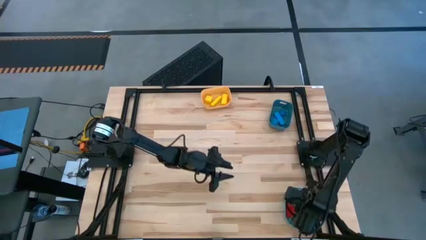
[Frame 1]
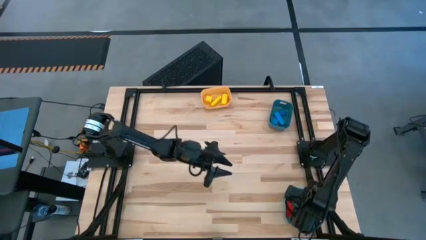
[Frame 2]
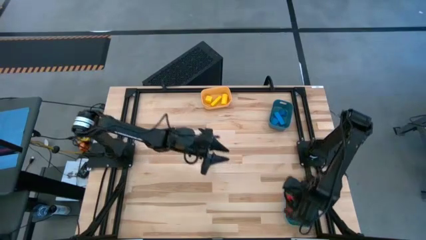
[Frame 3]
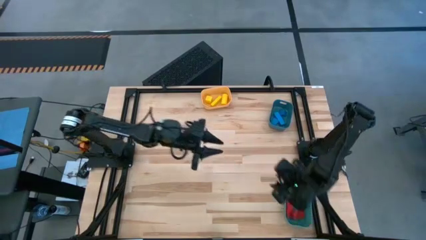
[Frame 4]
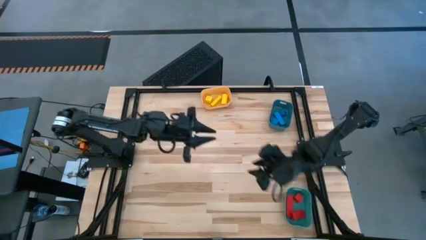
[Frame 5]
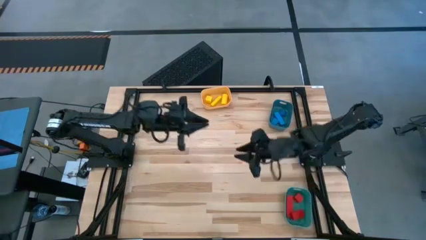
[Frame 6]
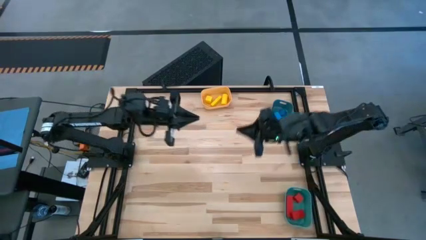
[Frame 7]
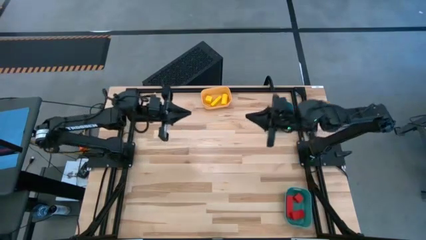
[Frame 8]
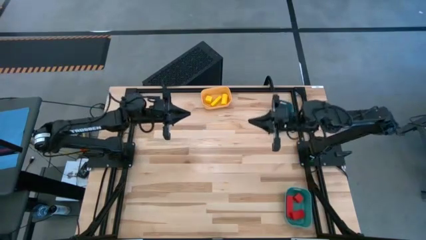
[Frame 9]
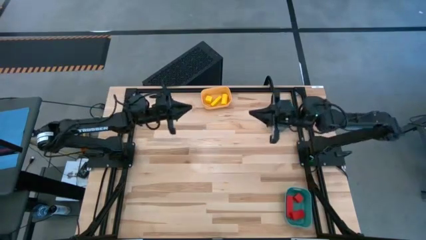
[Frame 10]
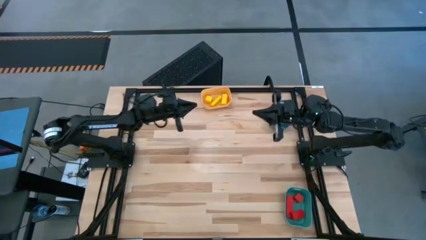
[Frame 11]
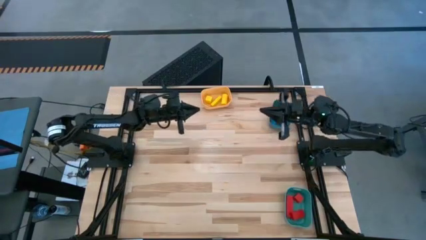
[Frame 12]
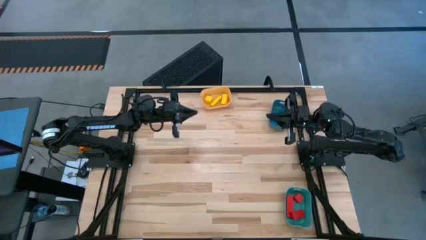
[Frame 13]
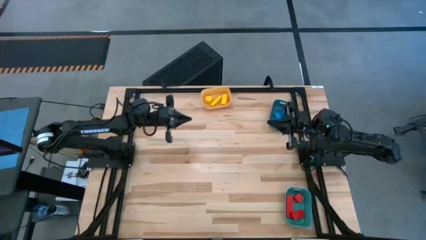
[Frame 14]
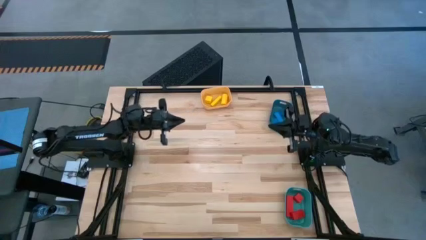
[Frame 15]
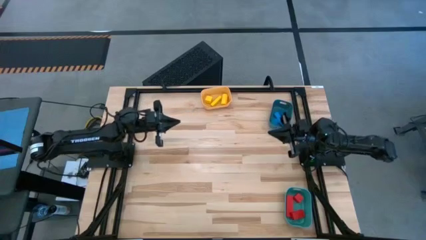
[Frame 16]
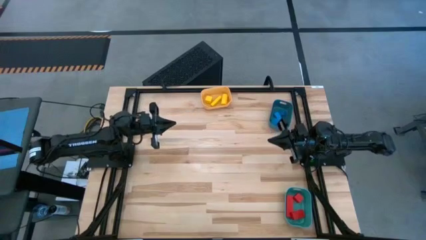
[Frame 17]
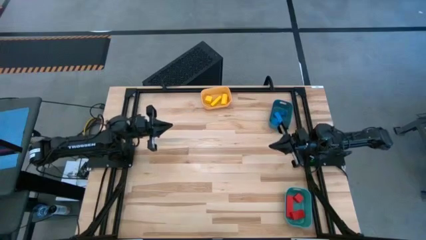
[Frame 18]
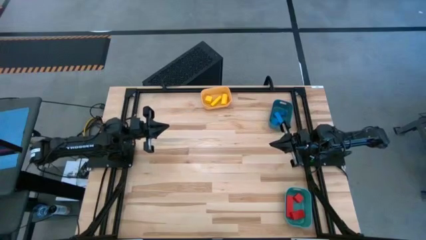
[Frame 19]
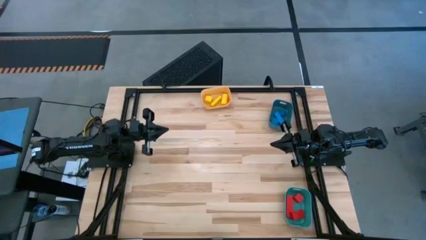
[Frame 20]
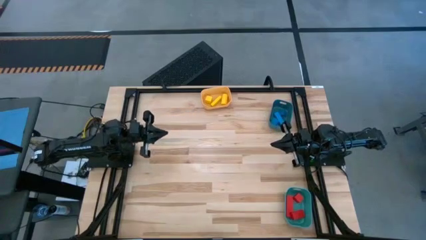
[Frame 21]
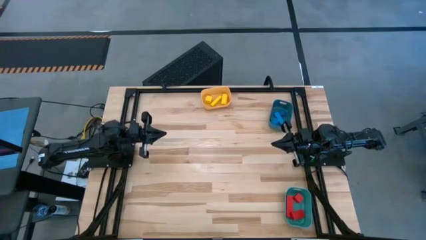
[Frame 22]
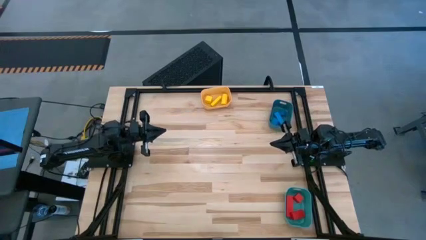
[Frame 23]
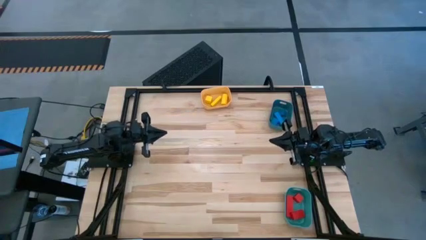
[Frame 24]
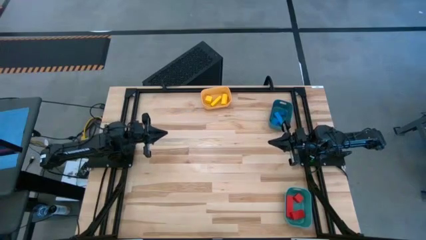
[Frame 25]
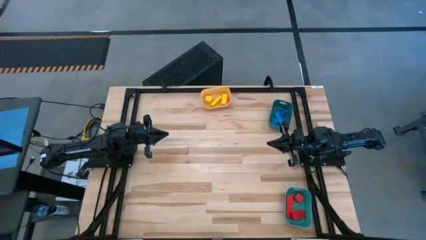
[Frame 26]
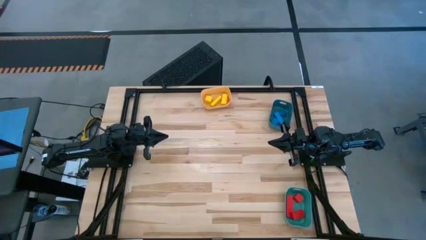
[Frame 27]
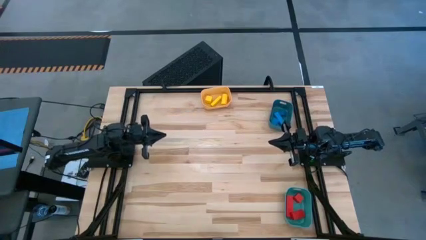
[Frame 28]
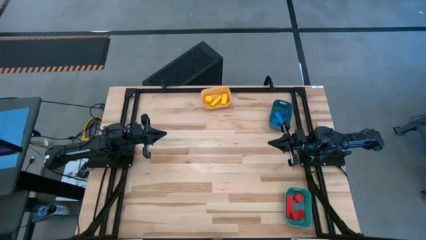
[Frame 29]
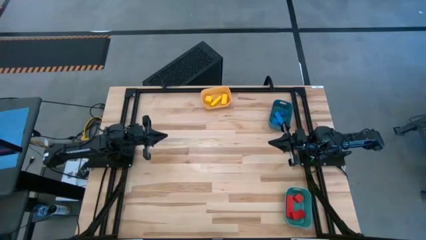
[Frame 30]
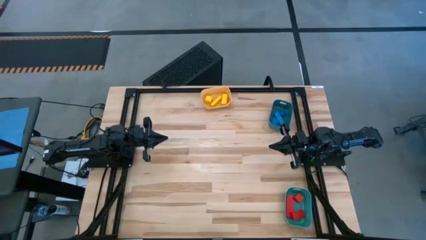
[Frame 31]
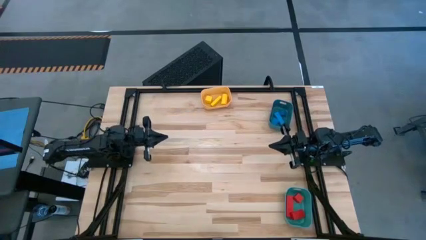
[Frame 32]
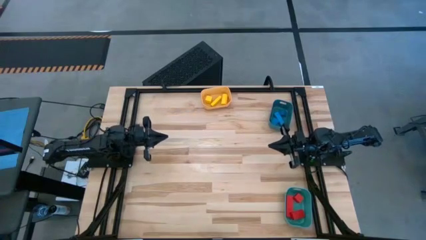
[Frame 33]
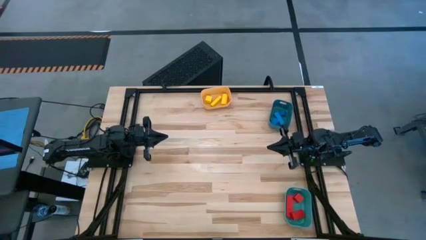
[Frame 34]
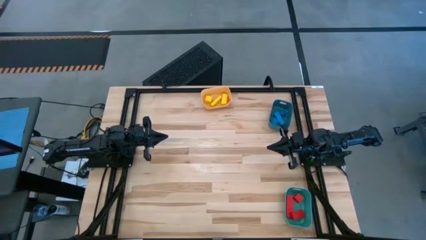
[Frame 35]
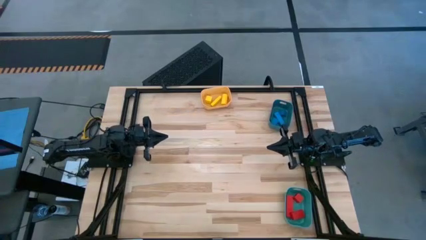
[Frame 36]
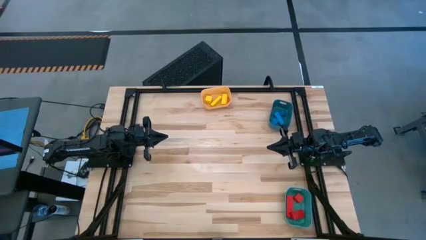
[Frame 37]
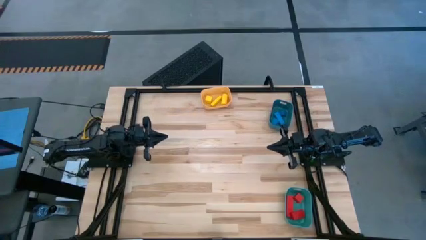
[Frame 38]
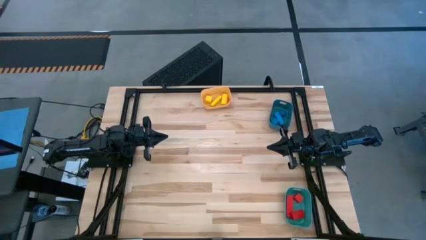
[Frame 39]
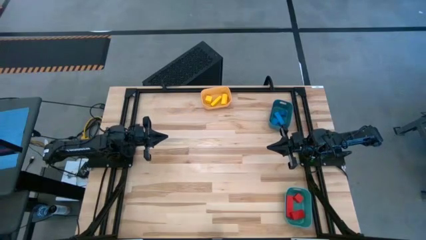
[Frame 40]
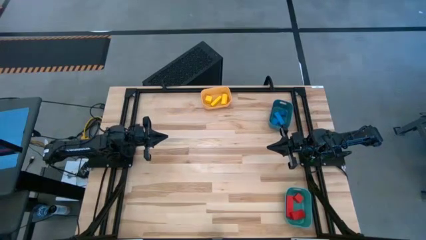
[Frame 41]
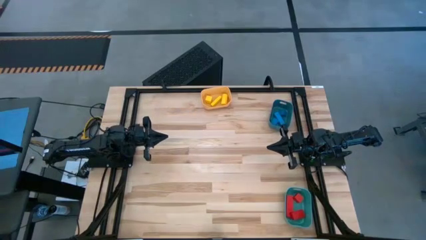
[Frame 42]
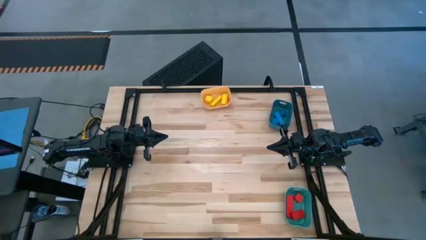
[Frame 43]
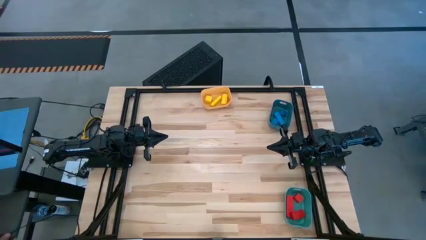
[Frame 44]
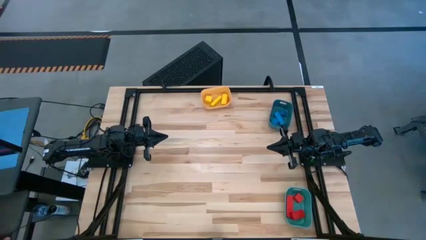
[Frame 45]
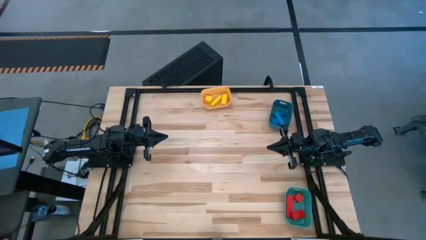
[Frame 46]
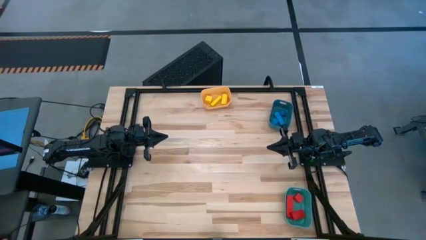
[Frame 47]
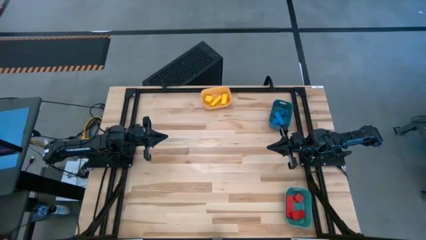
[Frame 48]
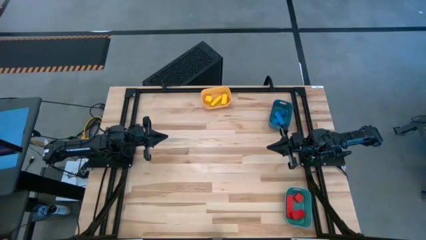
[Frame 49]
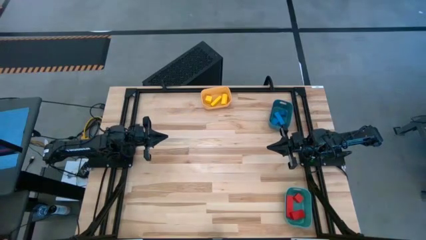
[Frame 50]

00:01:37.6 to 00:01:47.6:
Task: Sort & place blocks by color
Return to Home Position

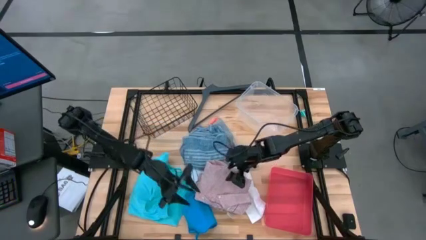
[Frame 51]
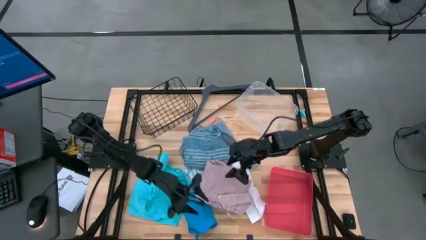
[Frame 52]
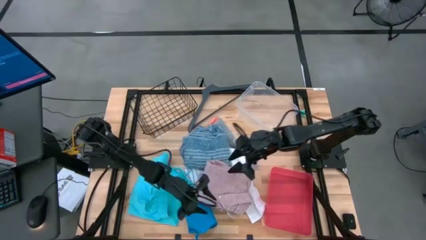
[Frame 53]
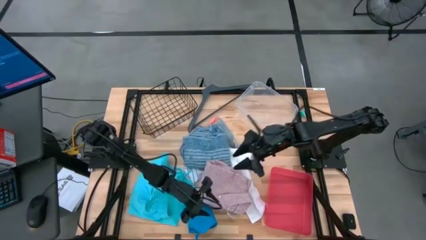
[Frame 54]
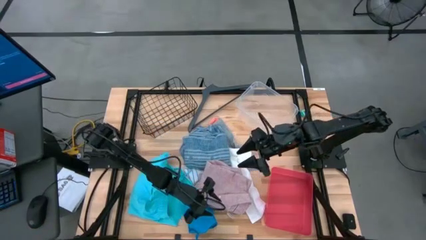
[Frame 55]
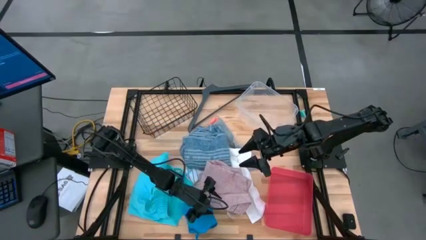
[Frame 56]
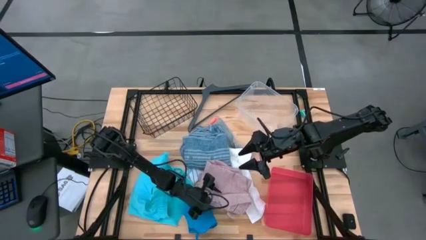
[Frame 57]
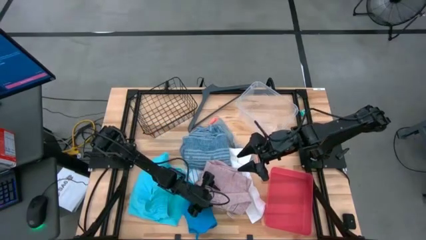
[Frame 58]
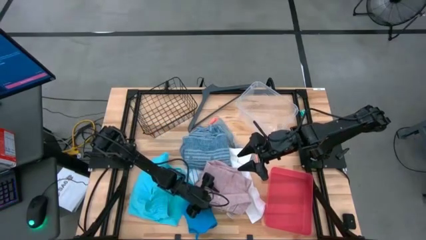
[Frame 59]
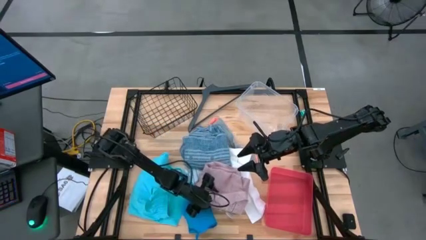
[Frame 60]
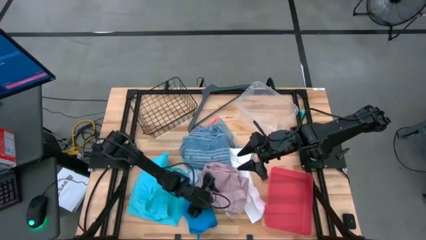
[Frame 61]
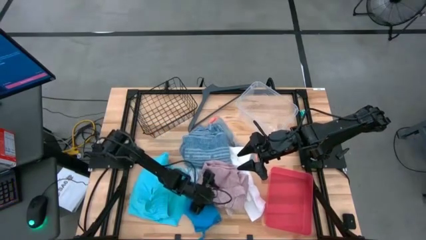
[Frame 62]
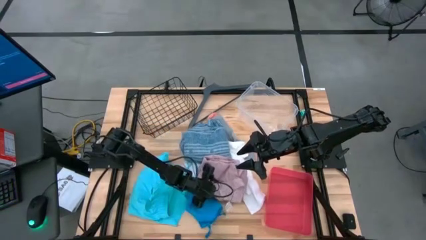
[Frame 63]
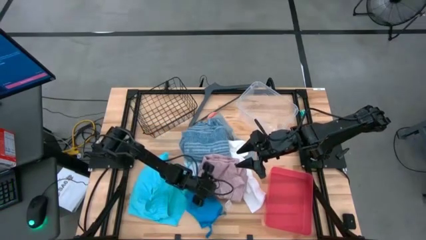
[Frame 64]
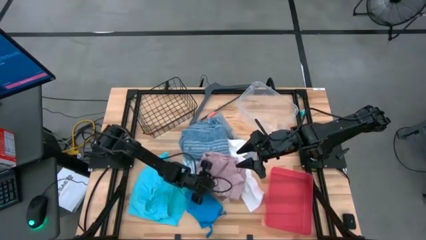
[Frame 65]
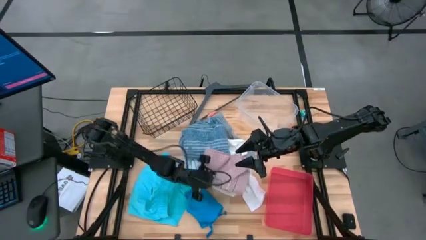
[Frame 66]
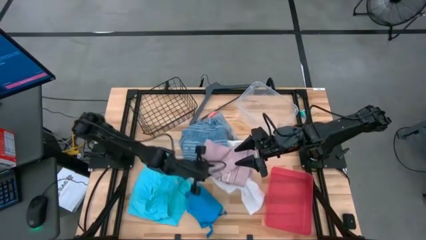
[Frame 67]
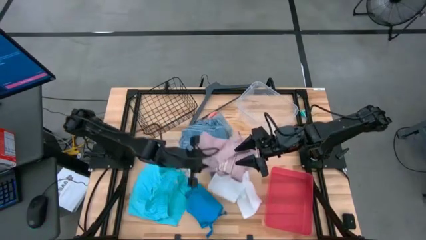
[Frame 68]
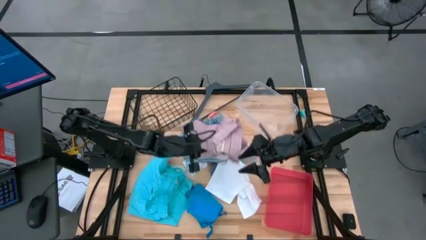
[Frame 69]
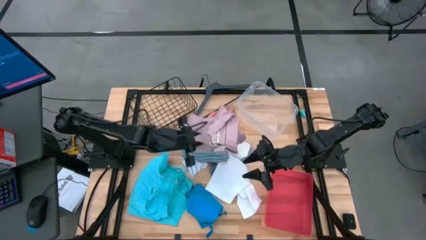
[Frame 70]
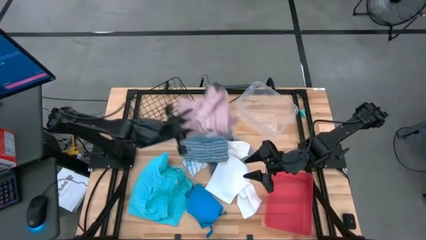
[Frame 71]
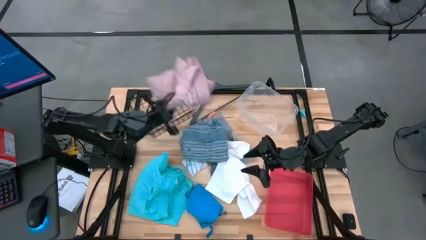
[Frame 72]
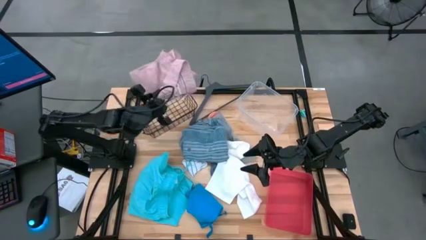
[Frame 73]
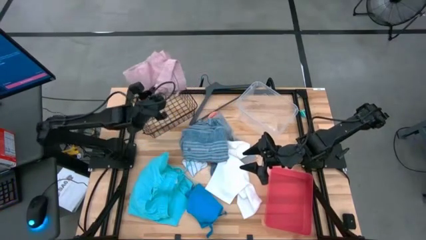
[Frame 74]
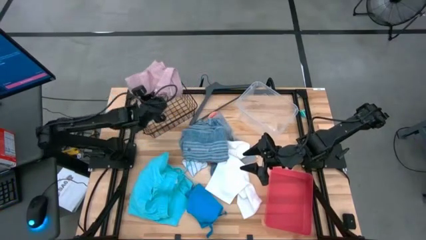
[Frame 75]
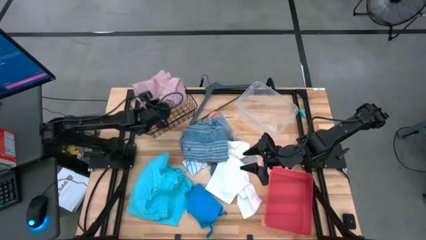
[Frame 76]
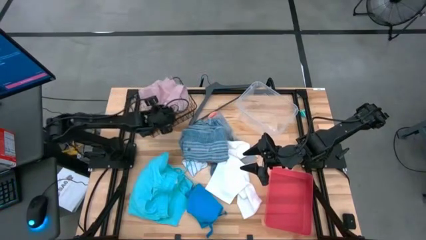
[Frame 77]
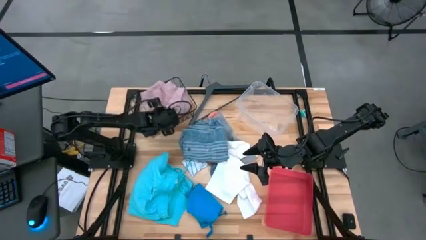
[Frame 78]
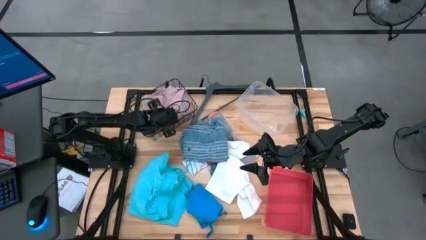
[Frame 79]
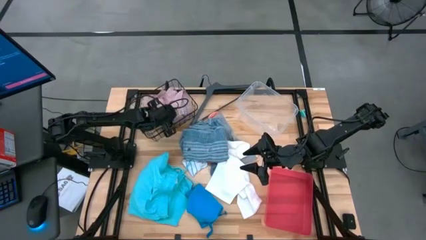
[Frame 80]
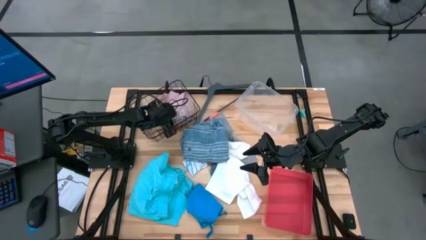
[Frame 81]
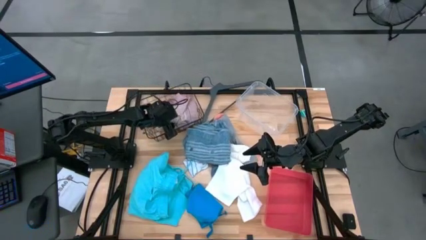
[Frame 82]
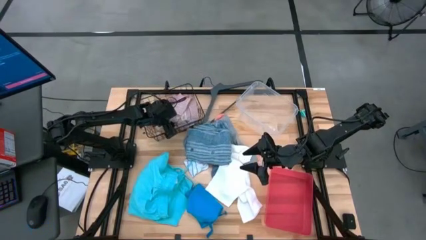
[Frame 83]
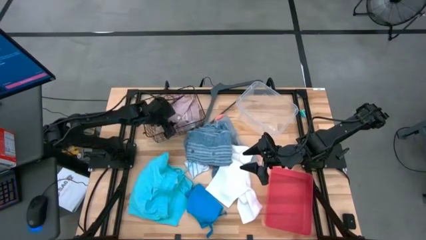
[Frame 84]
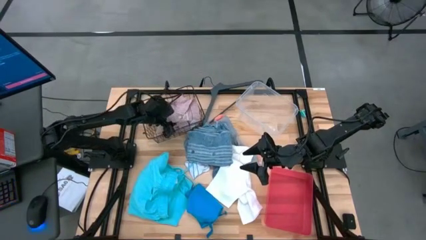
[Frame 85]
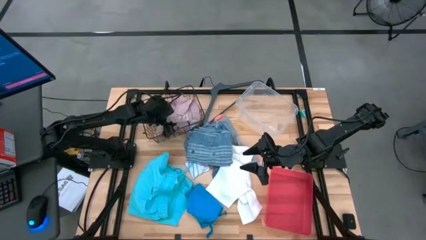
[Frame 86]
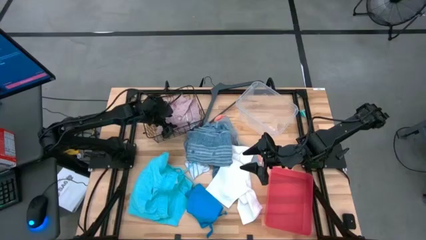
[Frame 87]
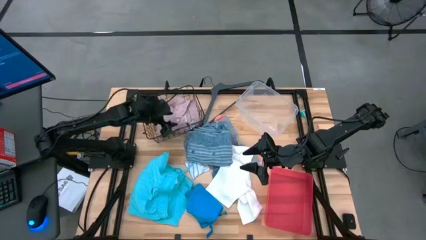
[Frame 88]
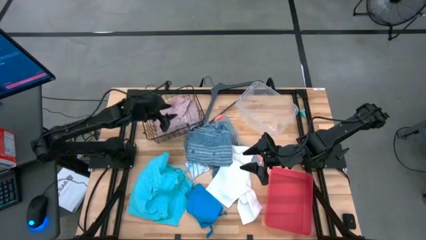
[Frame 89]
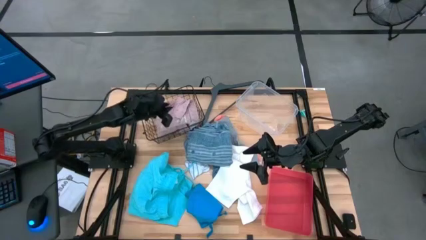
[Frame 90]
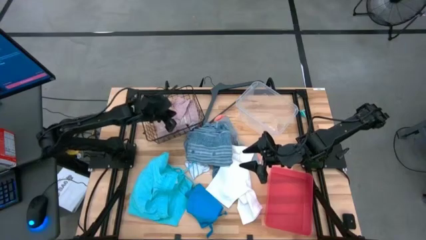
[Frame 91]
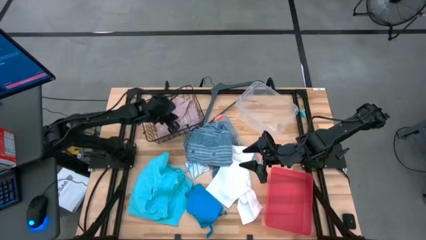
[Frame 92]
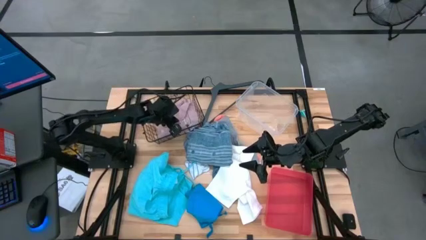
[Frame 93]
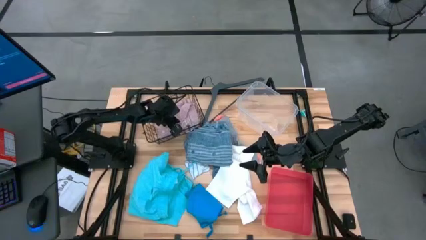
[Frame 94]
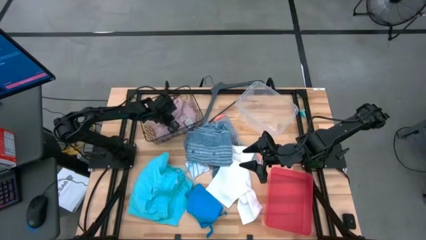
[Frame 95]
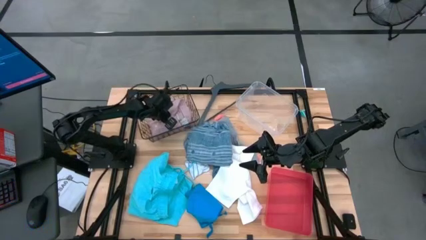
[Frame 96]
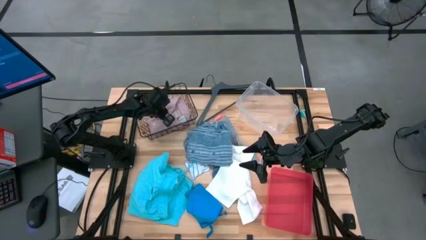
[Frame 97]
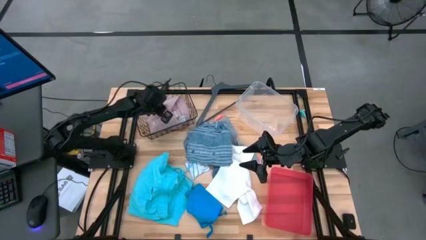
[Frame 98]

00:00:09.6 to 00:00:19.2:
Task: Pick & Place Cloths
Put the pink polo shirt into the wire basket
